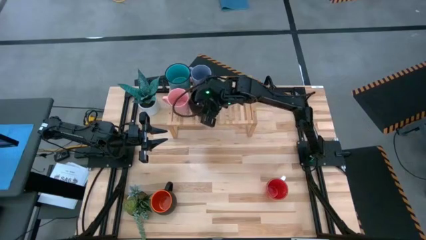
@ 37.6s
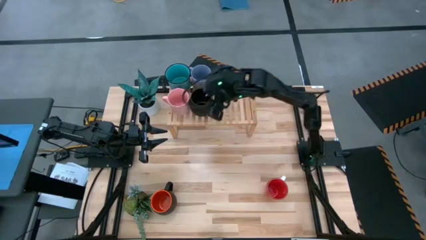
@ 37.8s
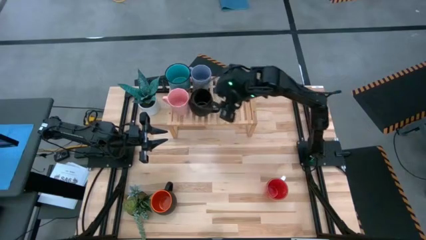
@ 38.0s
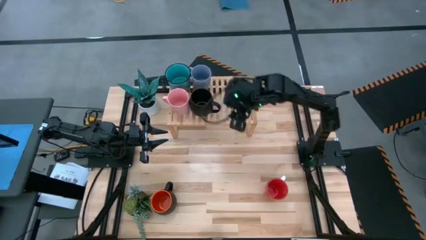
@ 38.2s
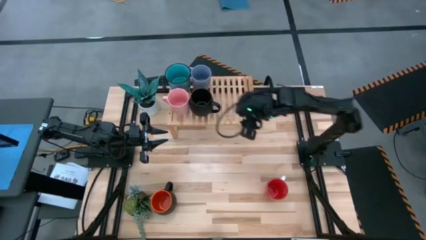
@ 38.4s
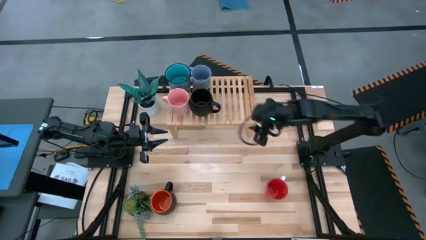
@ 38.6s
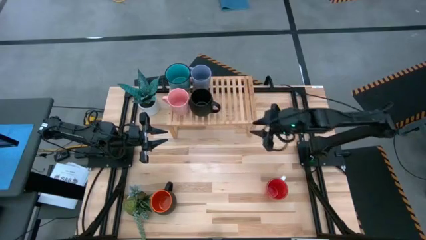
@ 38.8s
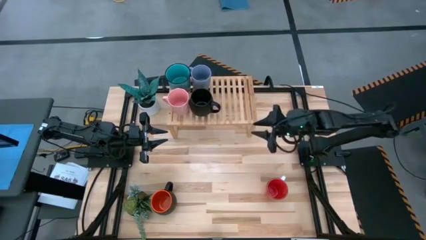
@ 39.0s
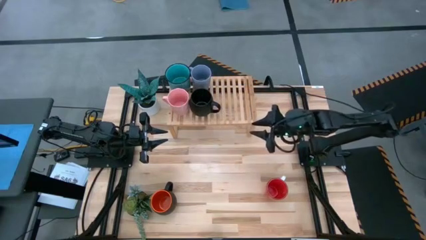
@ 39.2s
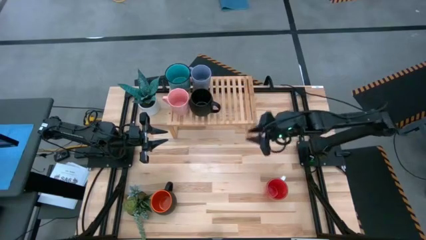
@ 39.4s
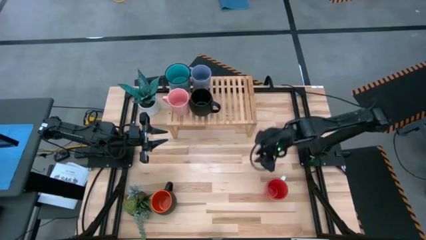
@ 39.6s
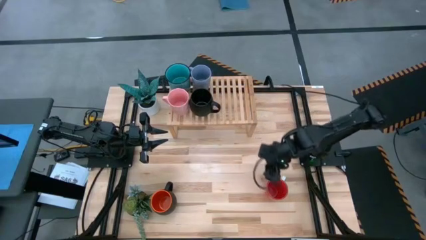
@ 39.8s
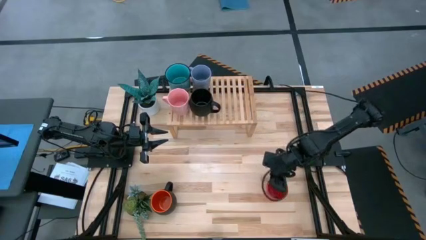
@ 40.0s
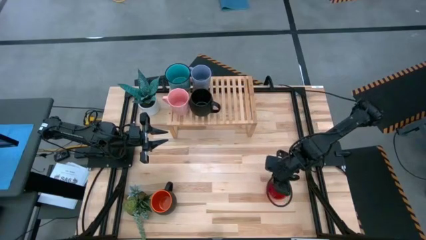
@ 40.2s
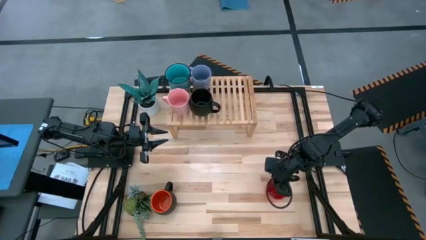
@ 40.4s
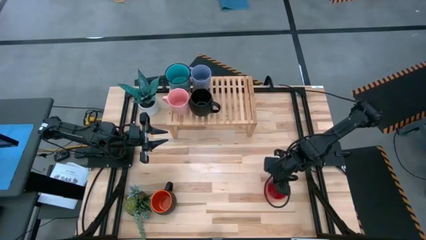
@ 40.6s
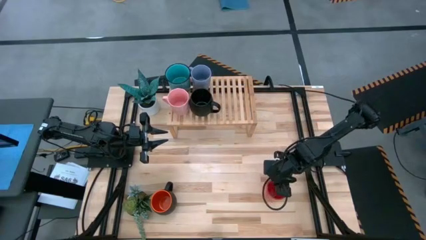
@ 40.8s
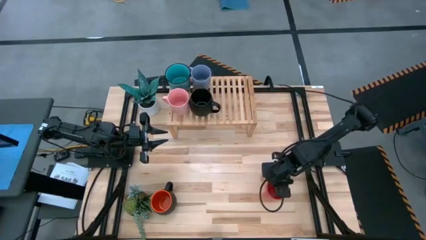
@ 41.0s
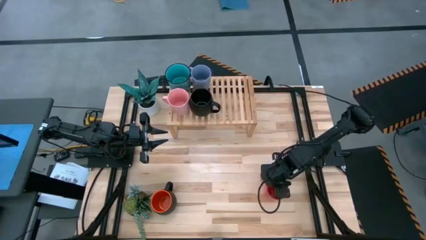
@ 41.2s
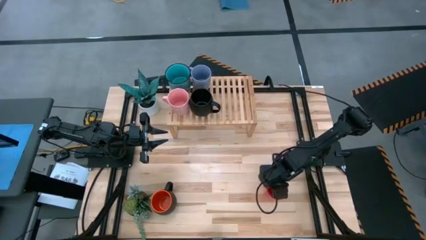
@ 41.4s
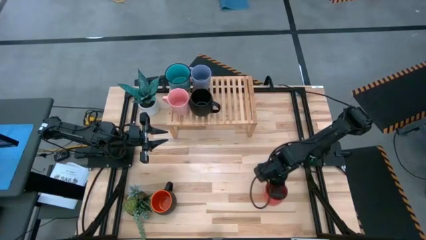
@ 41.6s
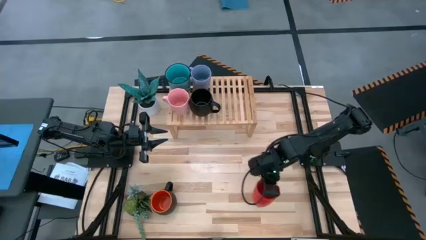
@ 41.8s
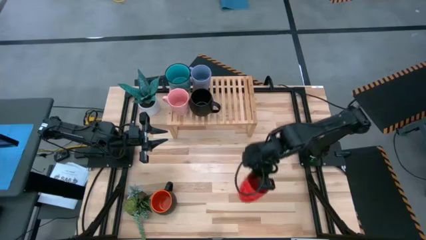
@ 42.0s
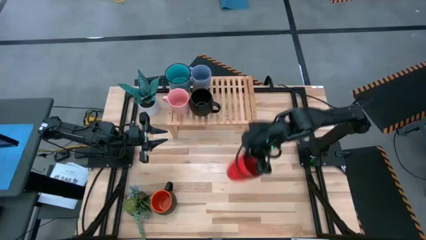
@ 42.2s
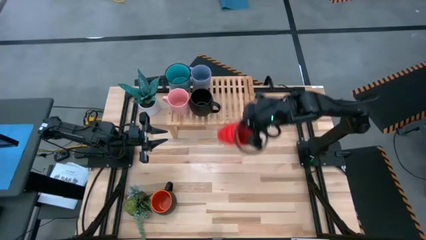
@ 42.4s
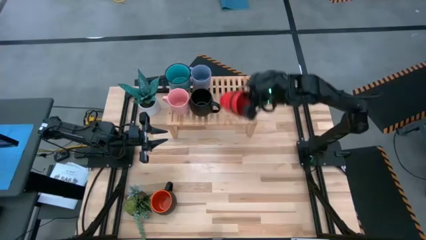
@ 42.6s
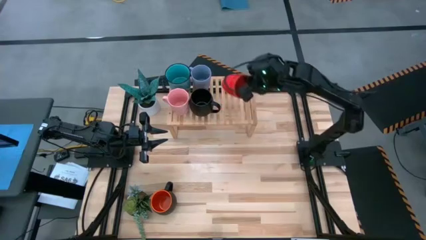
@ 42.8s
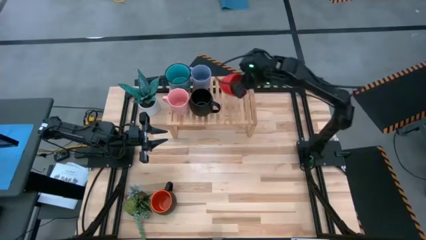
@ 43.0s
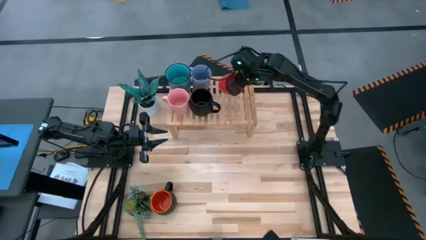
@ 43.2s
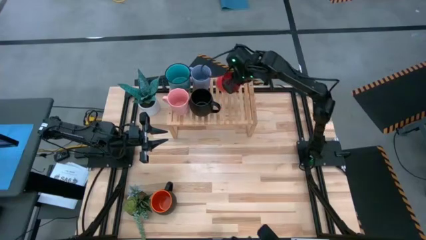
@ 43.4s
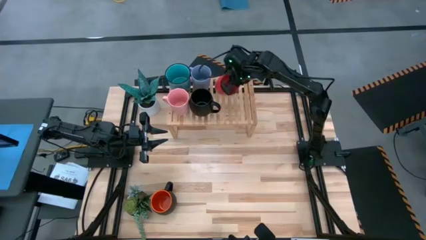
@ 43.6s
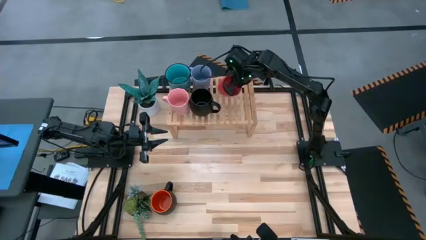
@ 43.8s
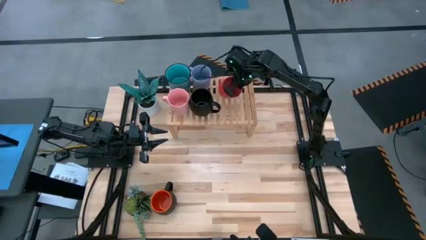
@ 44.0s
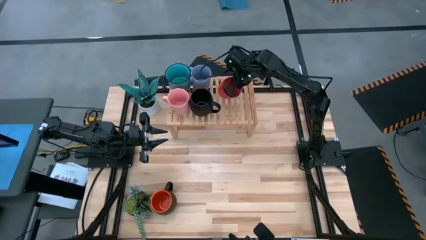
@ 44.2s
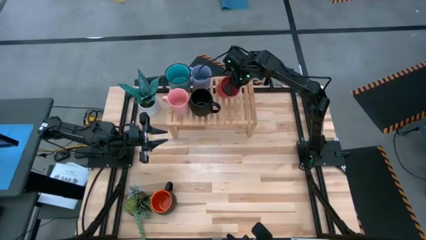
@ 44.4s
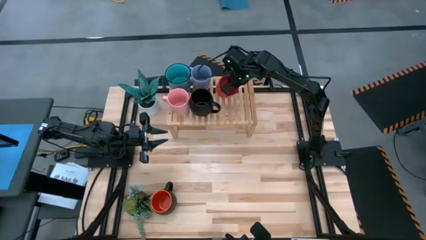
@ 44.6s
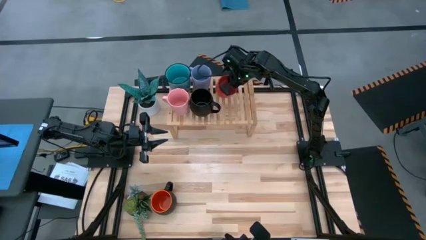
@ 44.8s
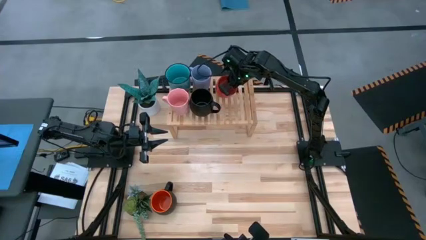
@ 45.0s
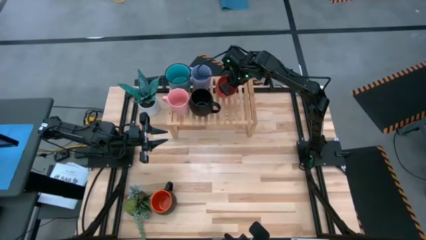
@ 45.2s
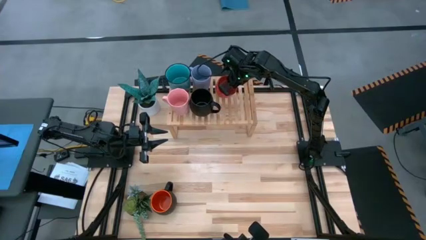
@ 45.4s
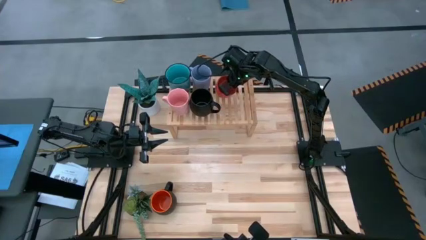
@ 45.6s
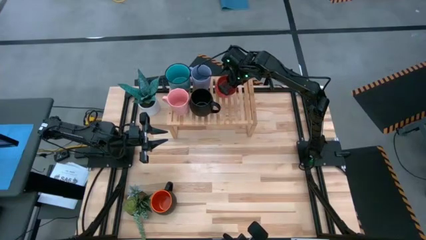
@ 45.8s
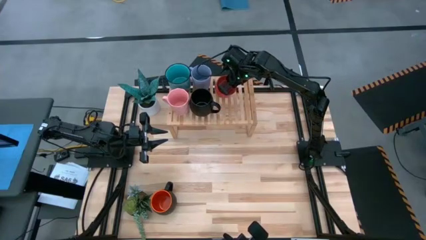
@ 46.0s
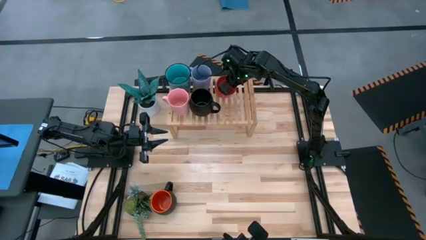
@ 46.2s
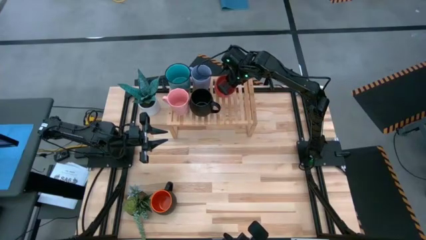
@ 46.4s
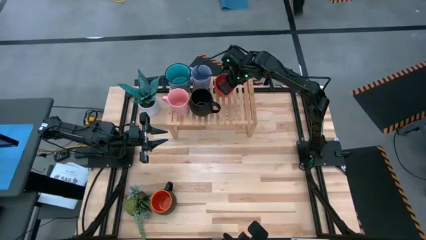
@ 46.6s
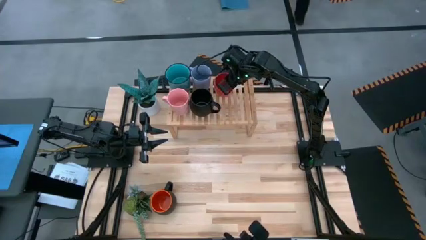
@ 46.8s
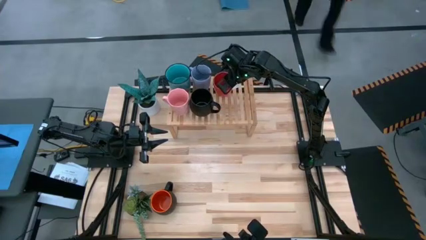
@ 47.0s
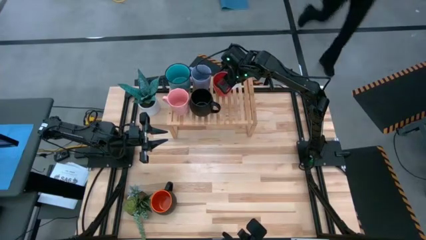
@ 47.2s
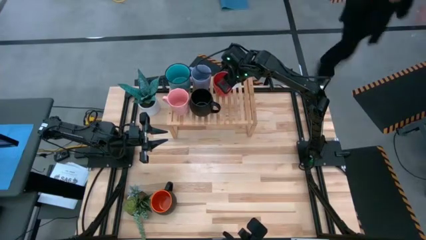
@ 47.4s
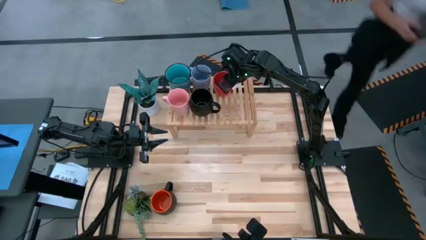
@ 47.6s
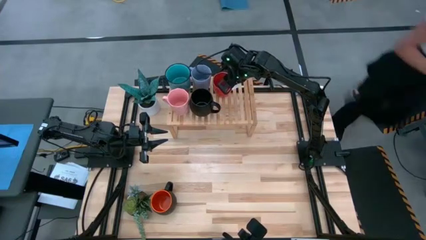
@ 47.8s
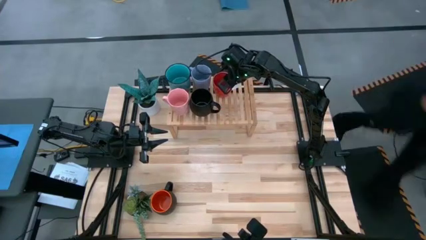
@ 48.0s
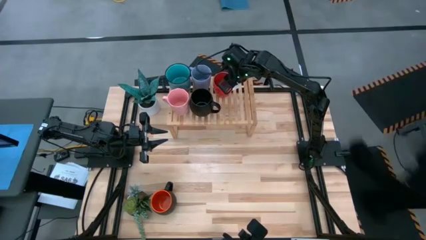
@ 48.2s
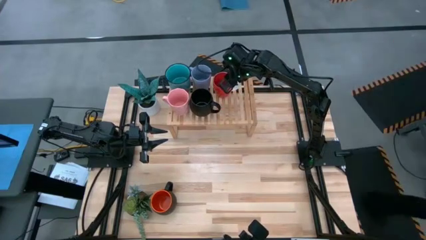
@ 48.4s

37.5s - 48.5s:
Task: Place coffee mugs
Put the red mug on the shelf

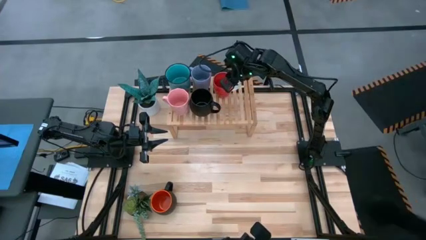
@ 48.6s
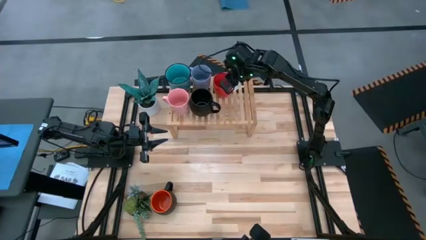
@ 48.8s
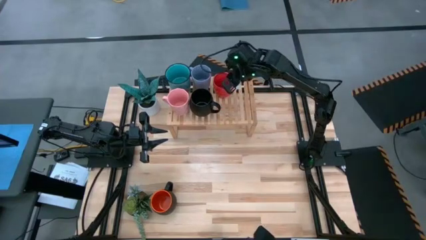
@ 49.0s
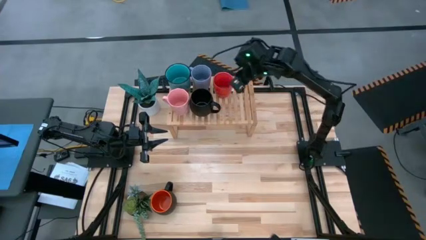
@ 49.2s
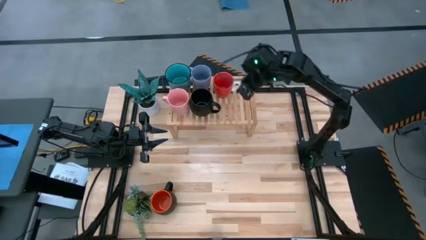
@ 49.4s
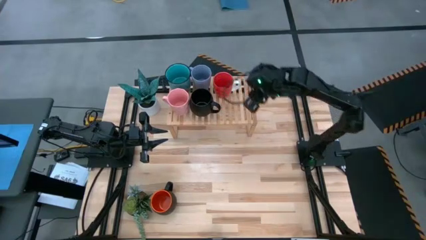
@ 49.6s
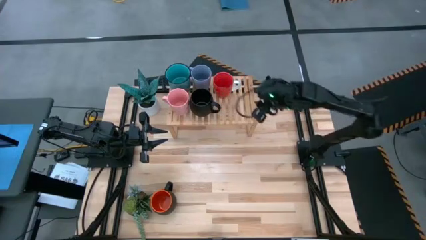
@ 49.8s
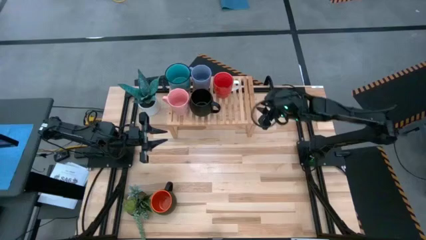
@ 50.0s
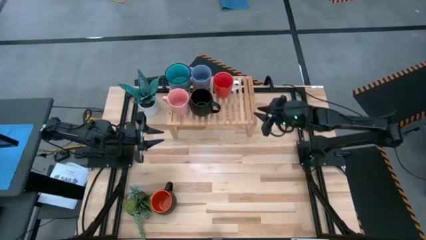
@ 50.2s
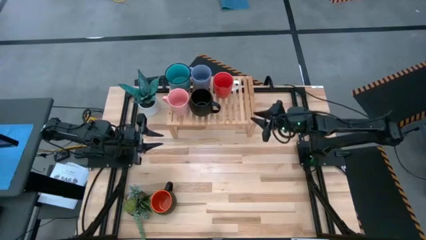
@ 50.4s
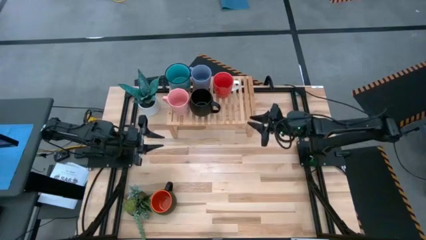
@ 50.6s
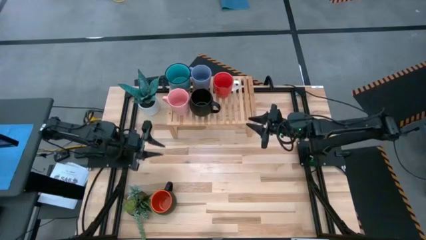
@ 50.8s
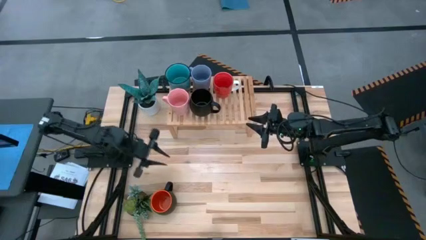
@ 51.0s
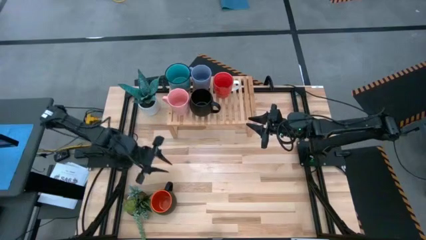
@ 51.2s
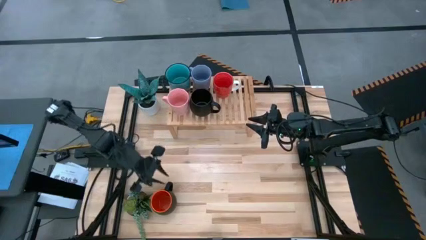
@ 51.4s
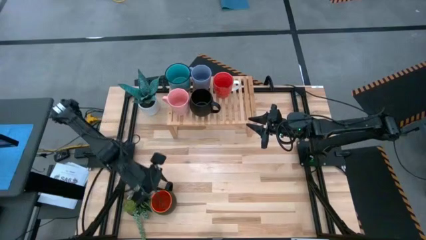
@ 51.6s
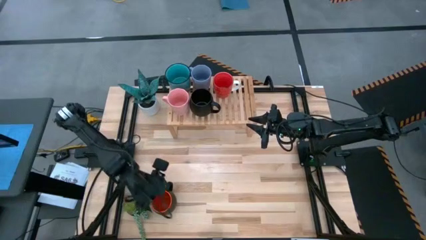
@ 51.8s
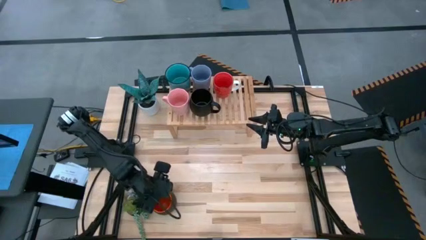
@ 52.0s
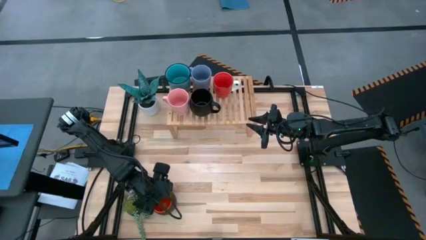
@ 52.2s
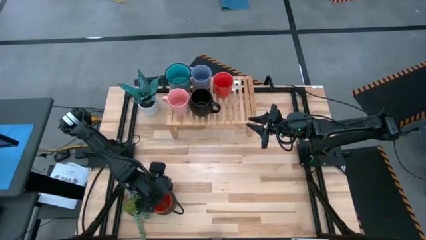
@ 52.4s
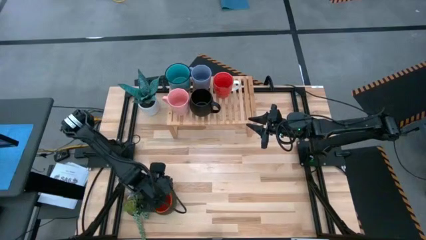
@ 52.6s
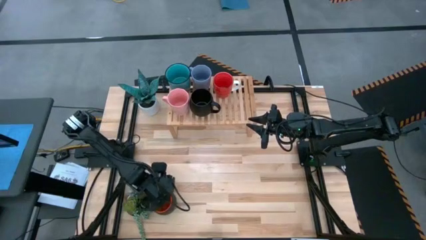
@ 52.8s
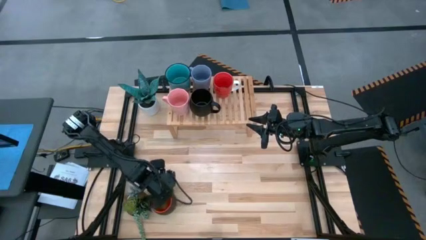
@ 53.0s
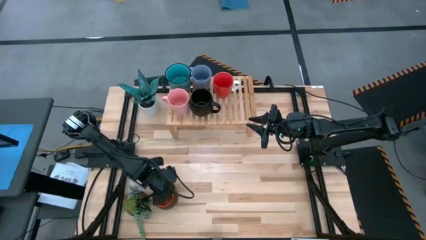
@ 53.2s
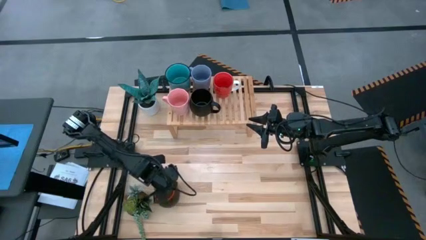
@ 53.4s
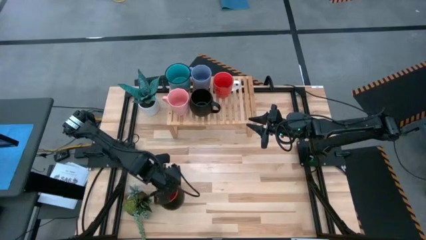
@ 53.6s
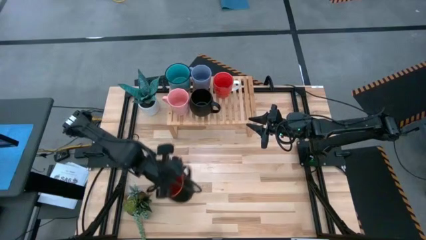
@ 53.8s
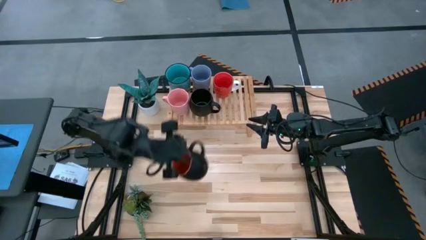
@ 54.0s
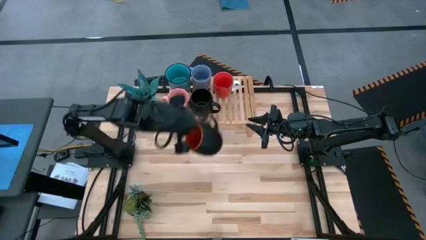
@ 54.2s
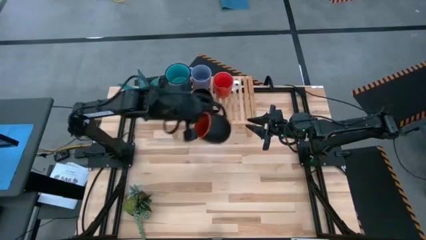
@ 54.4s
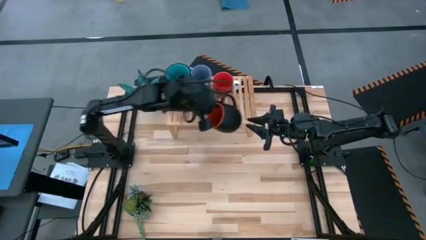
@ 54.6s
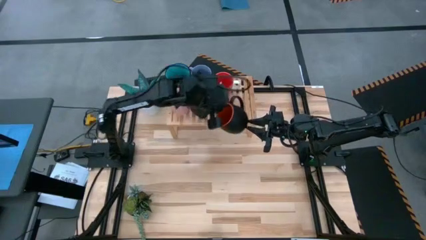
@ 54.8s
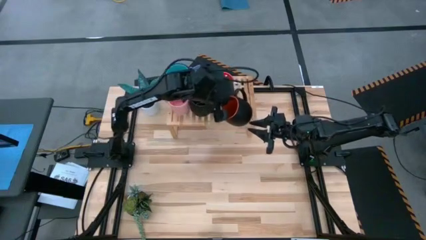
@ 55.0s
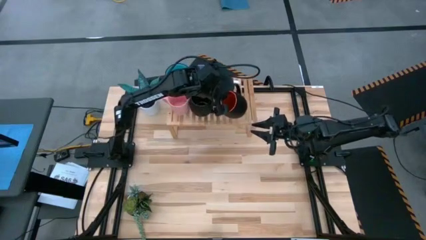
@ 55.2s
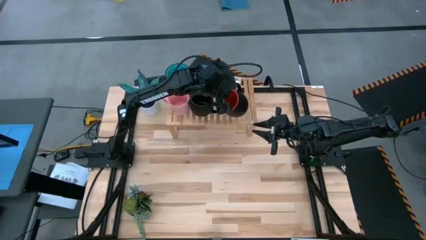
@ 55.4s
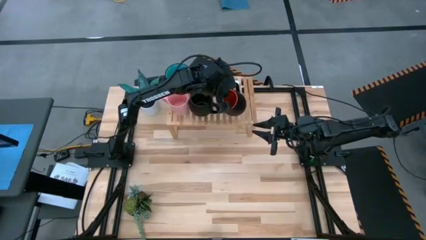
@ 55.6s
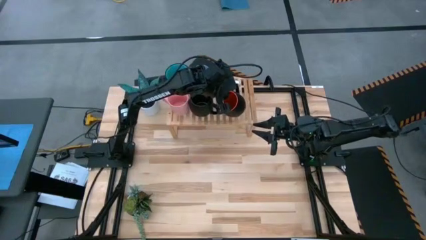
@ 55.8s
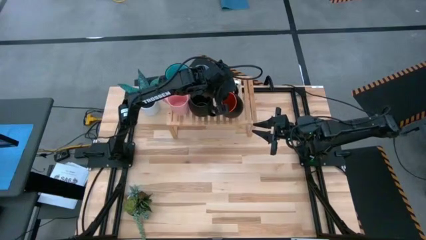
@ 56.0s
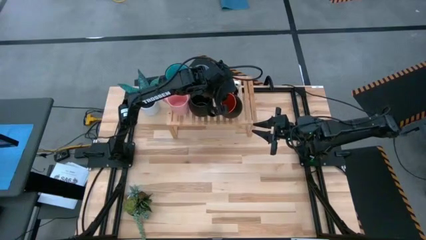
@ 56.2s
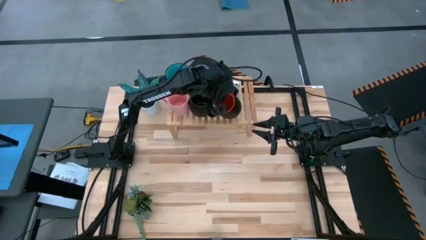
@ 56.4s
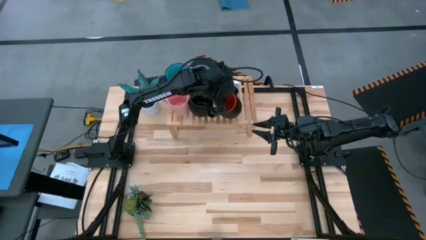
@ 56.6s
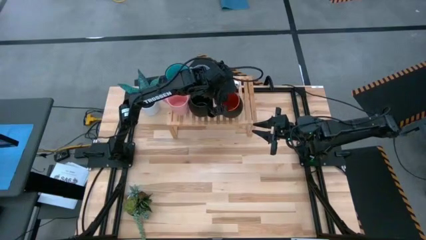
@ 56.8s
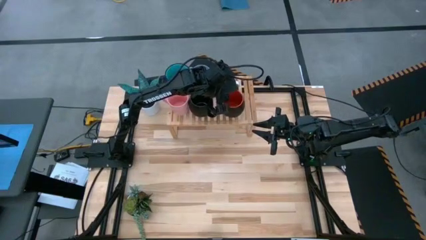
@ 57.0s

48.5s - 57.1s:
Put the orange mug on the shelf
